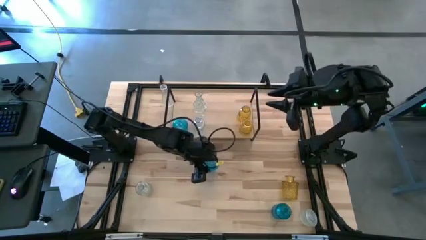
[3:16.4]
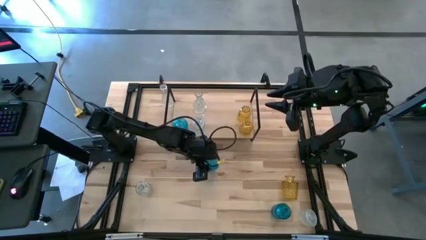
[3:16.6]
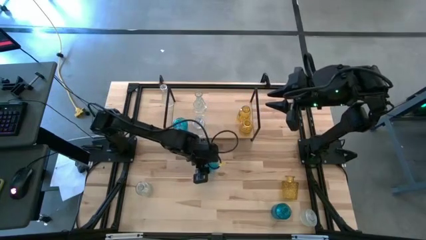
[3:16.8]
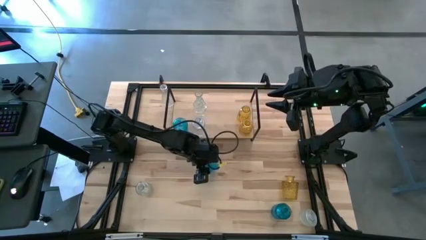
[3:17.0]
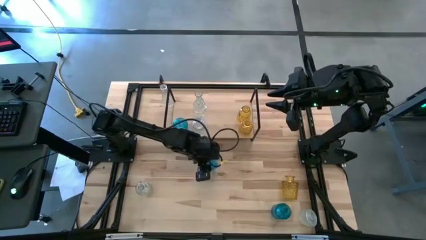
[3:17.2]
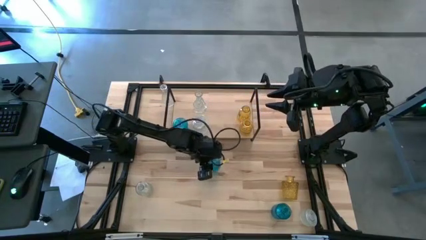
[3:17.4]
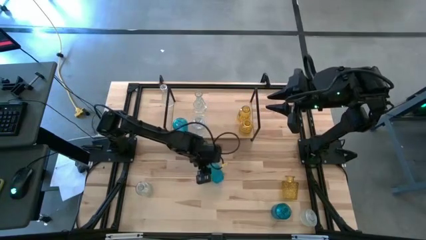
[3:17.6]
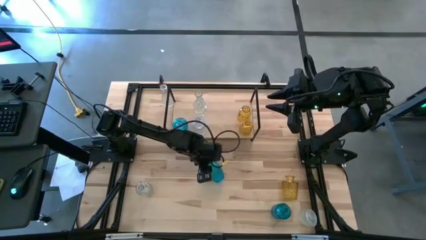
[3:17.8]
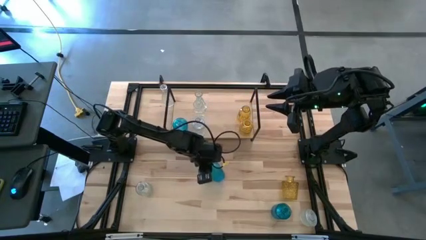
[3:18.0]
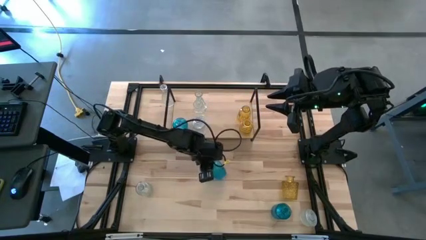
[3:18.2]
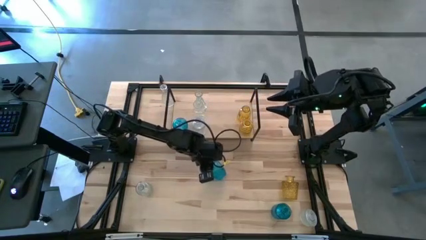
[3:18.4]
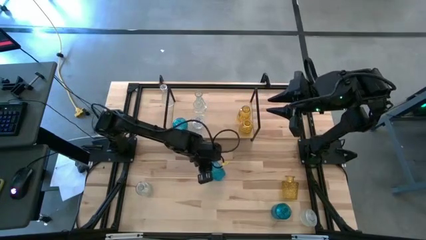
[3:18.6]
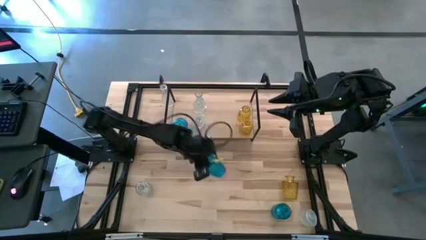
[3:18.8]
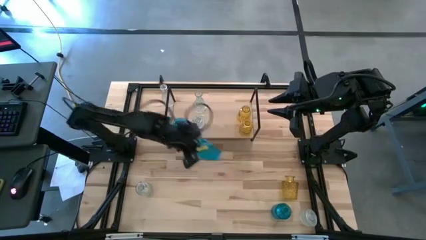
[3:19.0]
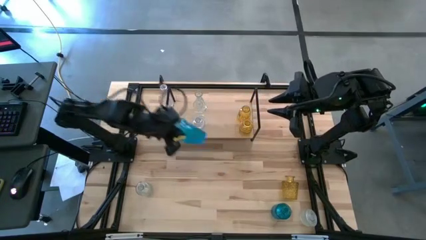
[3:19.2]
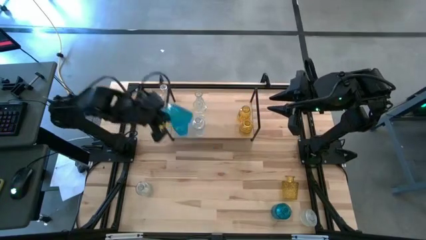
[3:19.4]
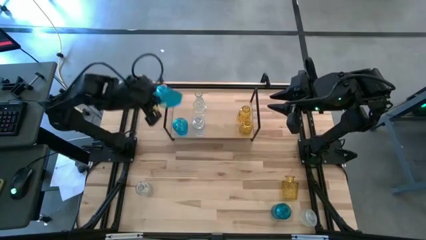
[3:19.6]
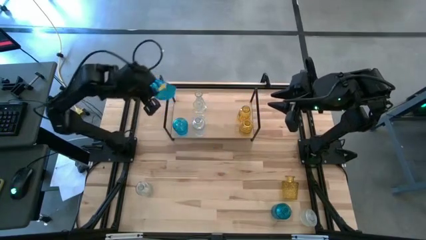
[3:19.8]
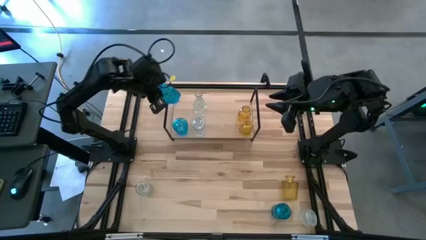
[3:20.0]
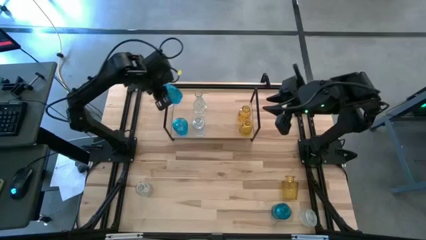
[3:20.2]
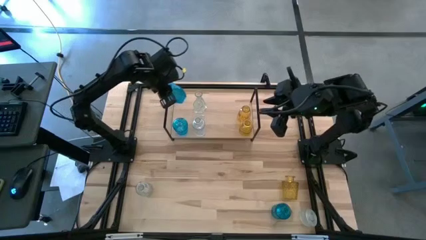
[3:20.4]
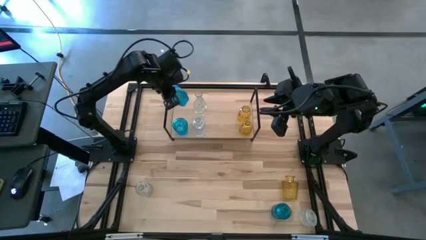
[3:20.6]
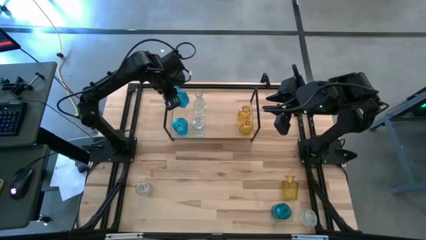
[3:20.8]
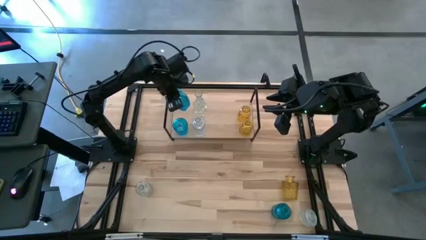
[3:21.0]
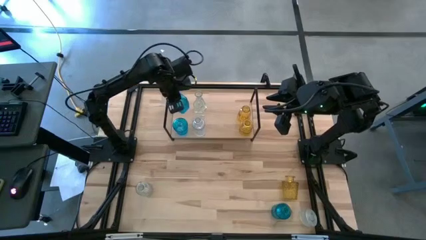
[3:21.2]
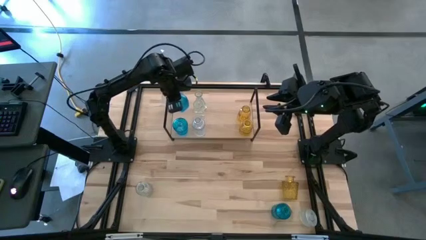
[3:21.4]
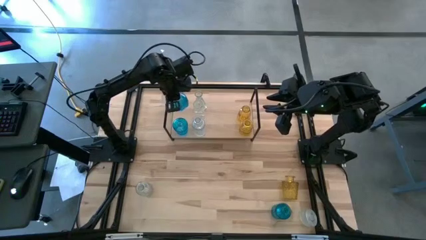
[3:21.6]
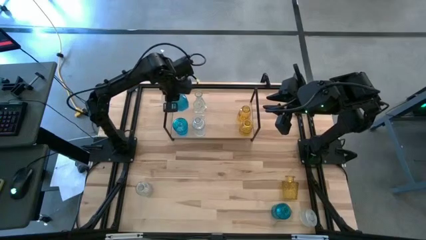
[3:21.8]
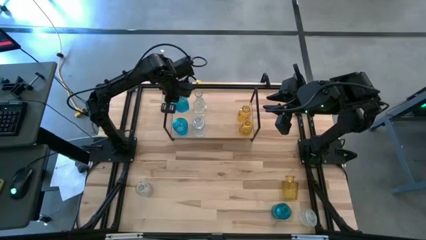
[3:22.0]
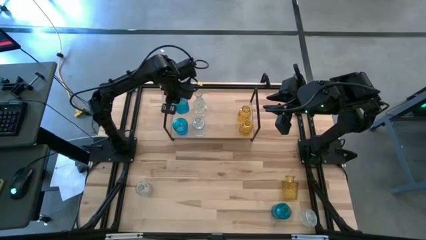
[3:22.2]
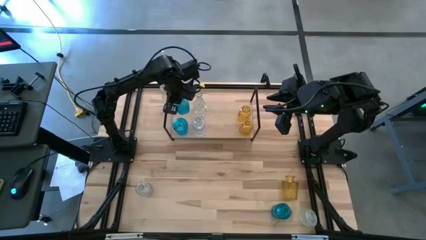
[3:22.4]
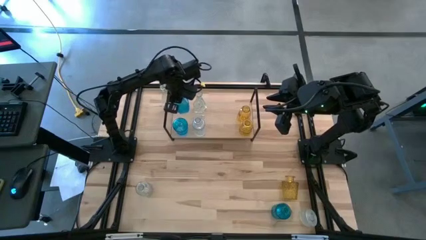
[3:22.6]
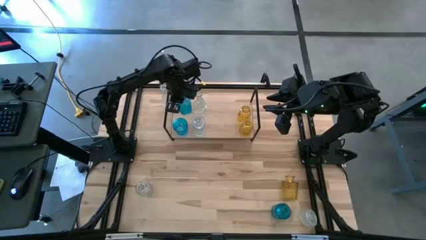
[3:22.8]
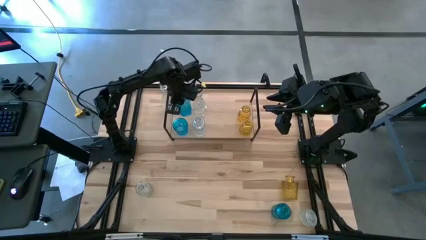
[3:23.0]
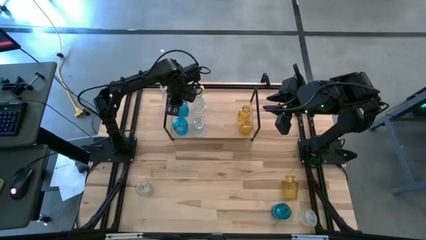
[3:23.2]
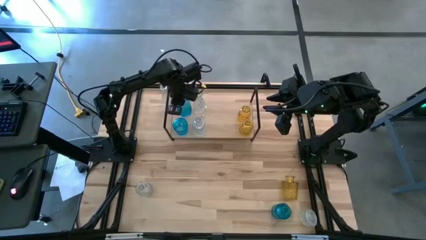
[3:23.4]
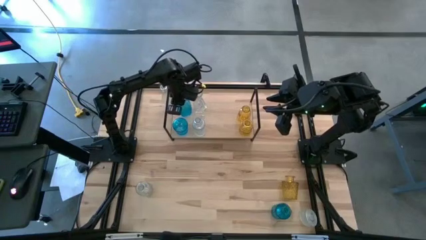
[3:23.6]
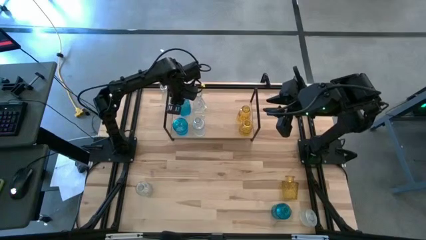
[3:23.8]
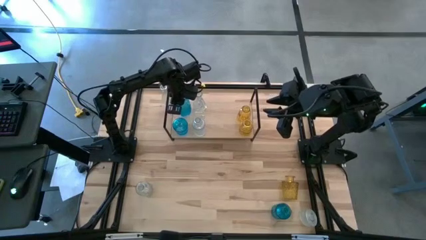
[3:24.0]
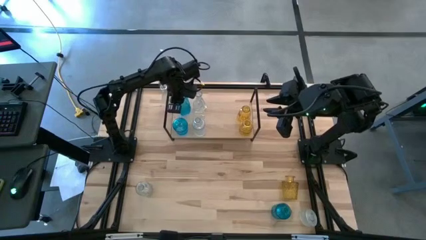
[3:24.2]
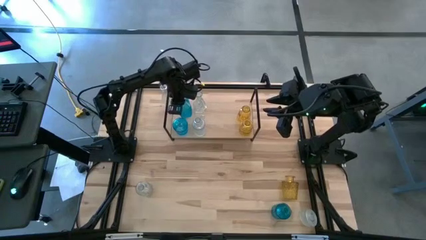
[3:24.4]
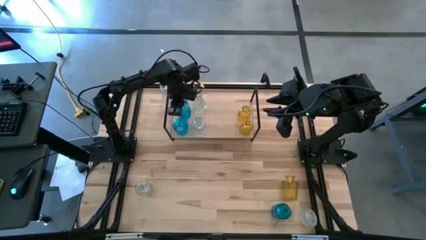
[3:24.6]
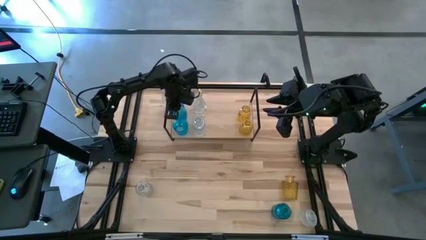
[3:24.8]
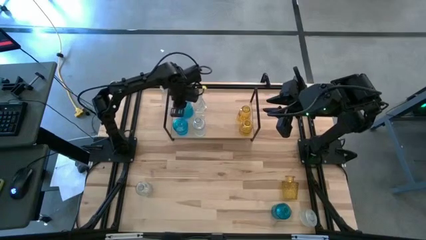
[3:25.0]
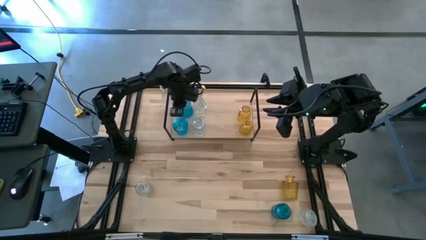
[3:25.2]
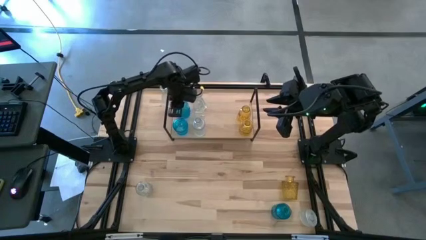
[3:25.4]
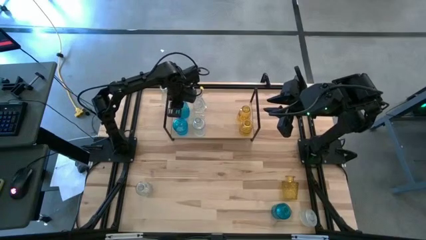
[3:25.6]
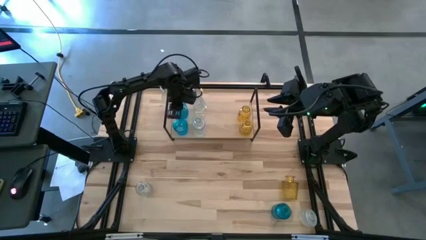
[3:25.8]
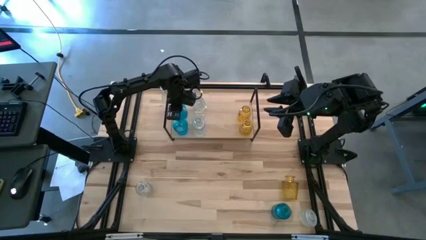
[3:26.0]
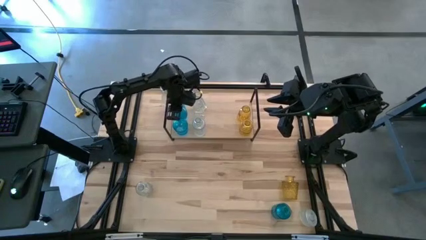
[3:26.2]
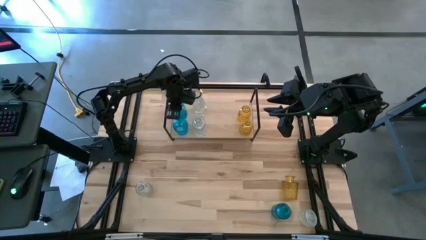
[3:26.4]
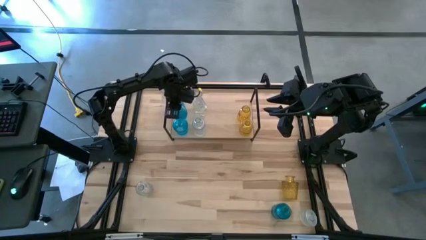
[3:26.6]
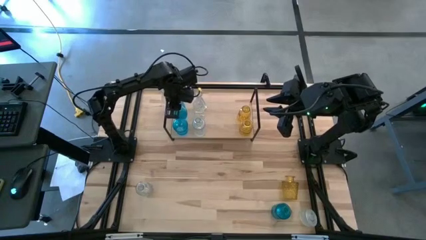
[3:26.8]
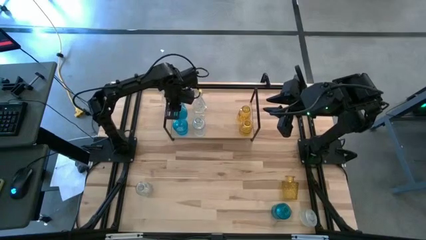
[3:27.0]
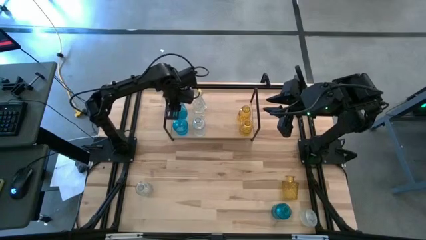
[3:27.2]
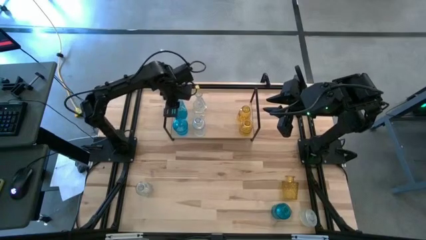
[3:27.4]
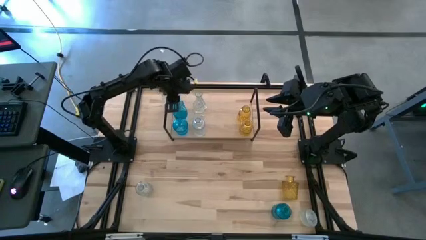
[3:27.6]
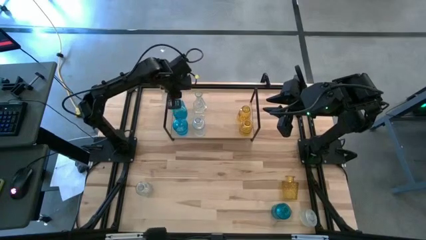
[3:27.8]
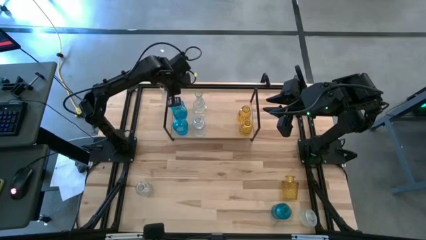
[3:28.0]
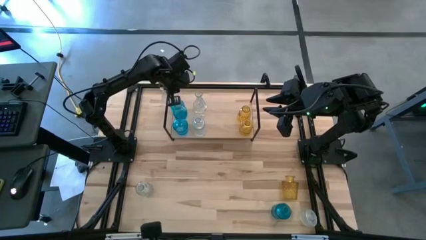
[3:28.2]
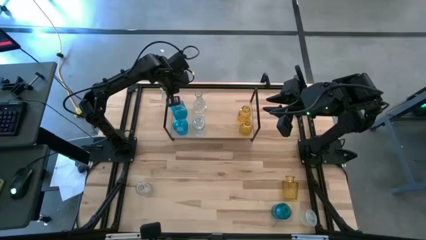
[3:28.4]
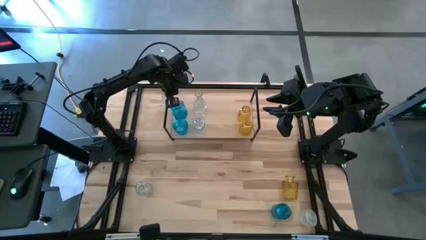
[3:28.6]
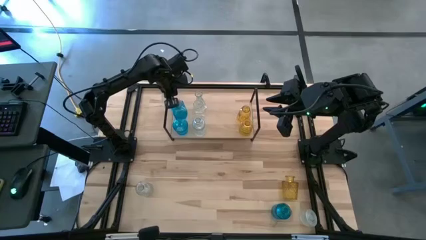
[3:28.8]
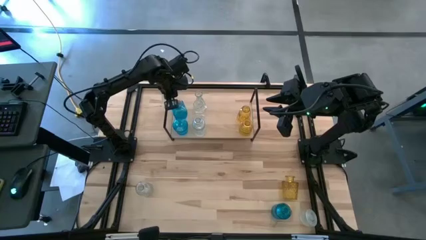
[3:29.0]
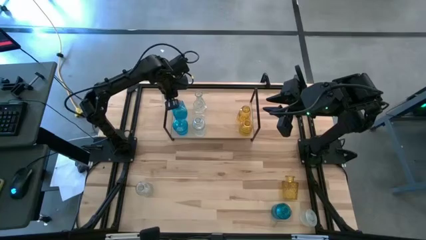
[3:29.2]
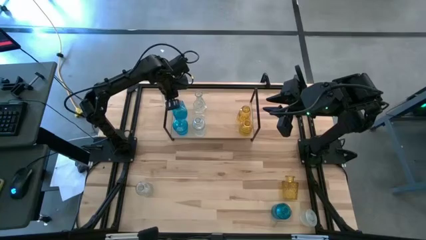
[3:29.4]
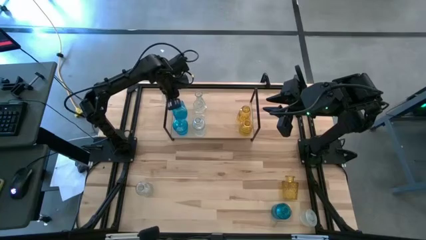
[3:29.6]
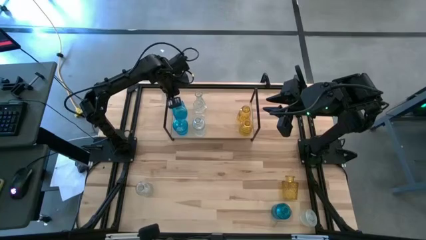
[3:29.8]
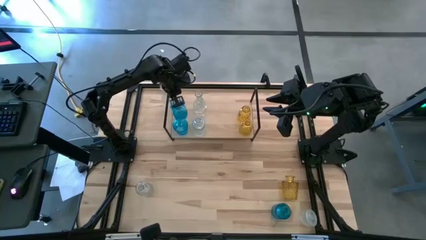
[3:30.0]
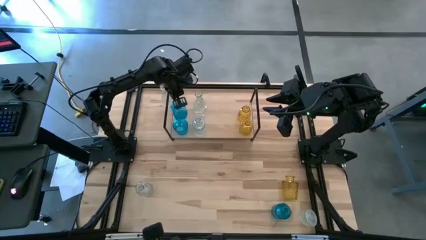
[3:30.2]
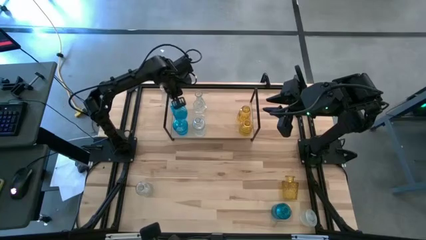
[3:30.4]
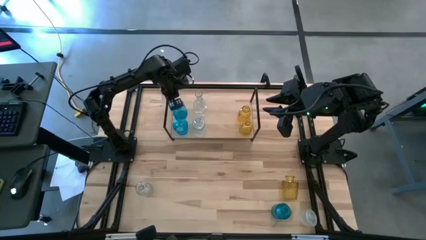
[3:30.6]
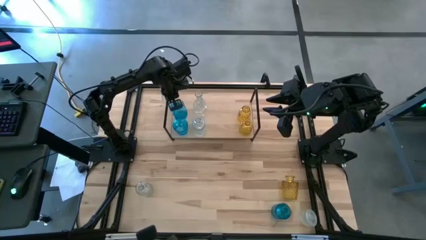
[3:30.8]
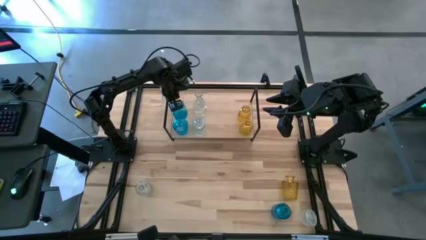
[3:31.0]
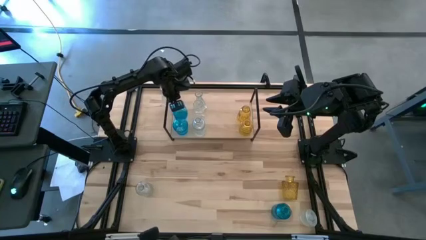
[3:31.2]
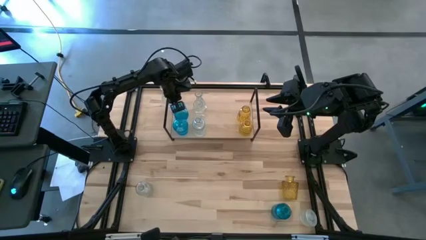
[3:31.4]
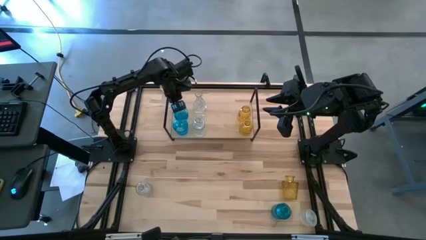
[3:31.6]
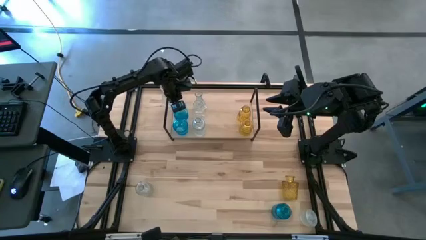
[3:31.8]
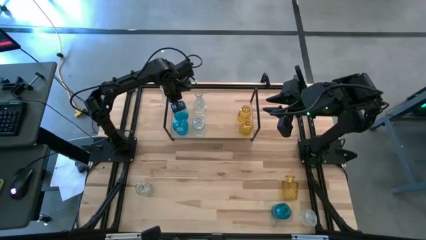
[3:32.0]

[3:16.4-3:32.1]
Task: sort vases onto shelf
Put the blue vase on the shelf aligned with the other blue vase
